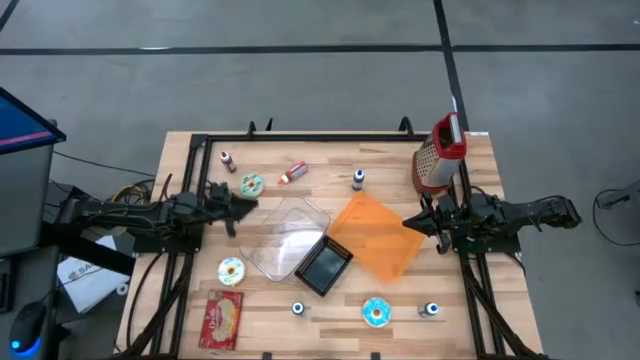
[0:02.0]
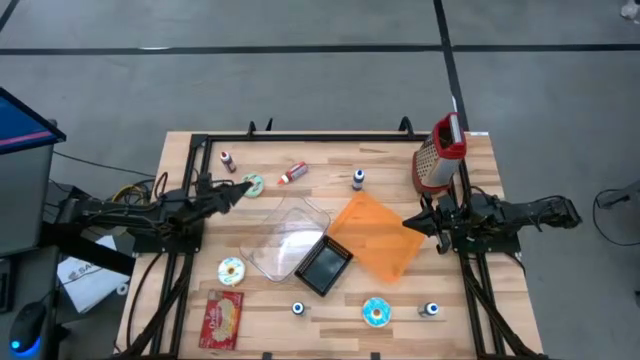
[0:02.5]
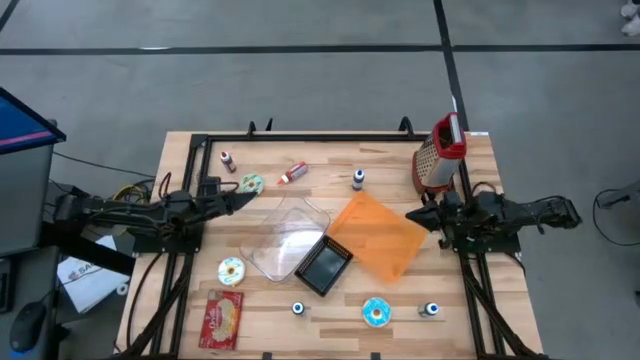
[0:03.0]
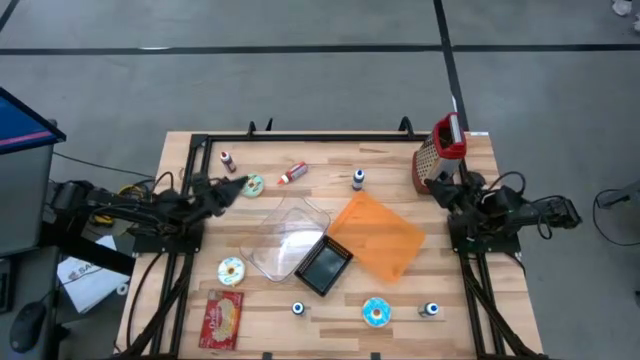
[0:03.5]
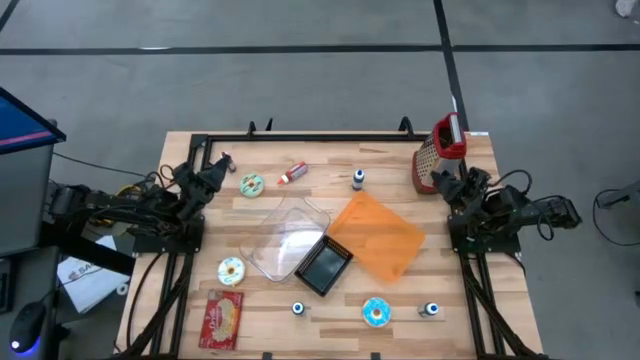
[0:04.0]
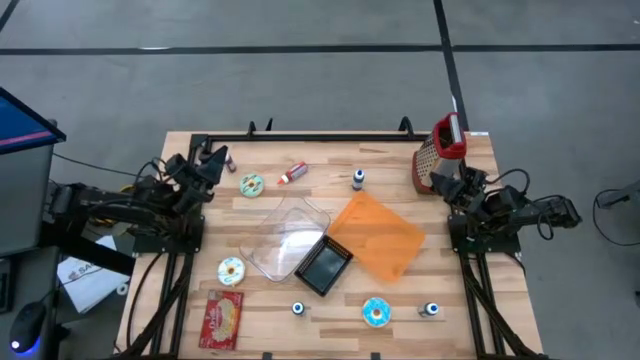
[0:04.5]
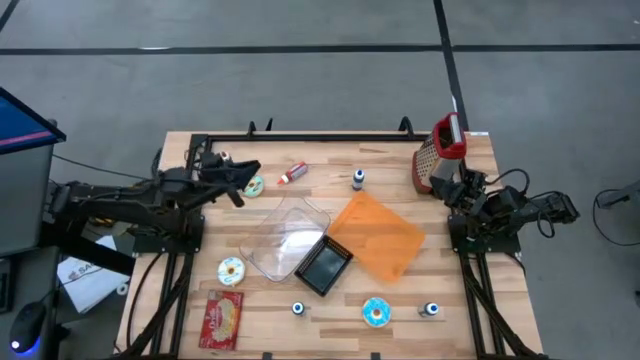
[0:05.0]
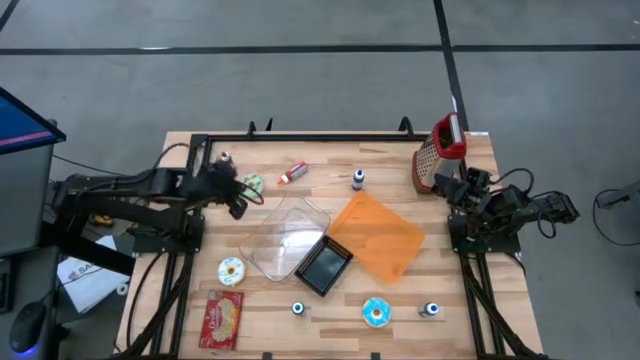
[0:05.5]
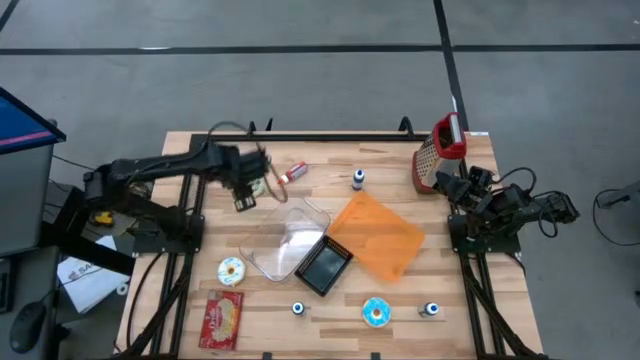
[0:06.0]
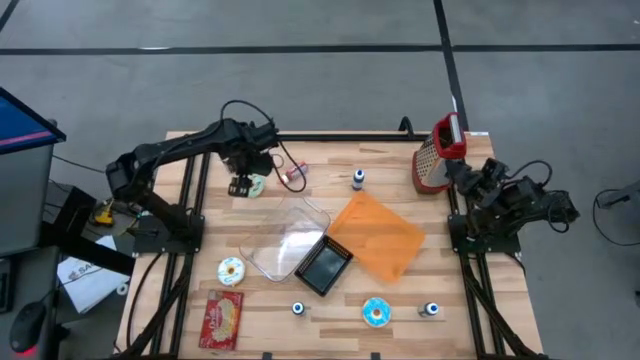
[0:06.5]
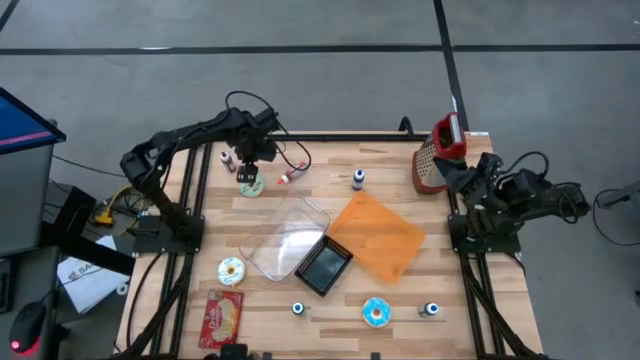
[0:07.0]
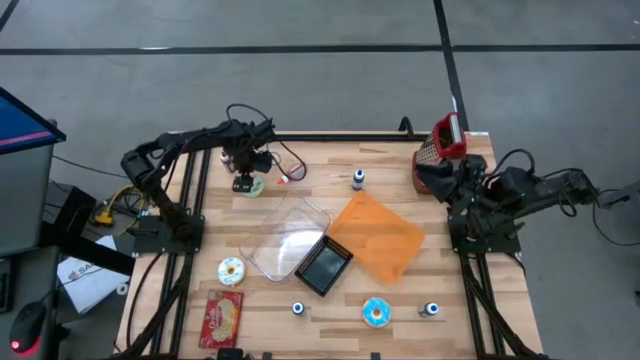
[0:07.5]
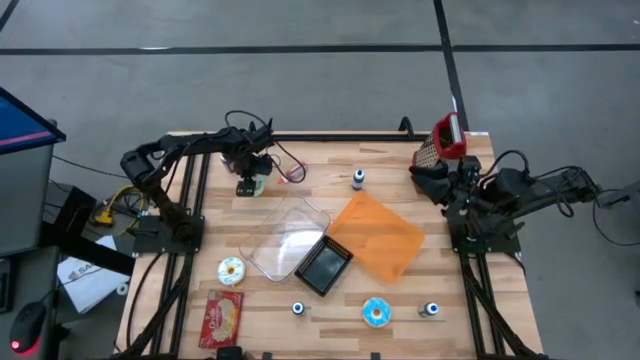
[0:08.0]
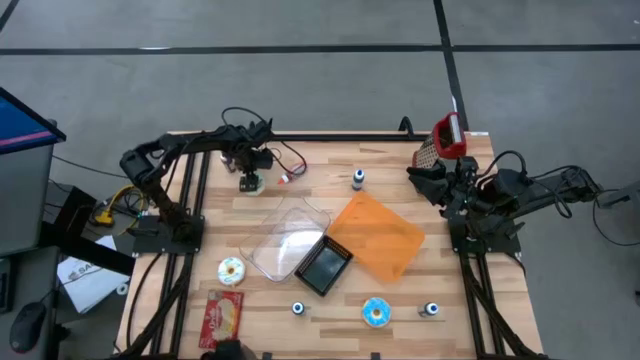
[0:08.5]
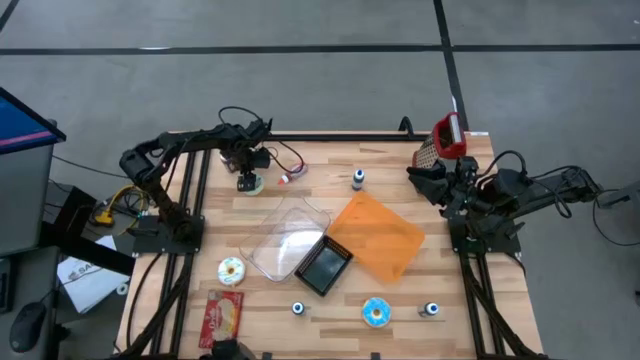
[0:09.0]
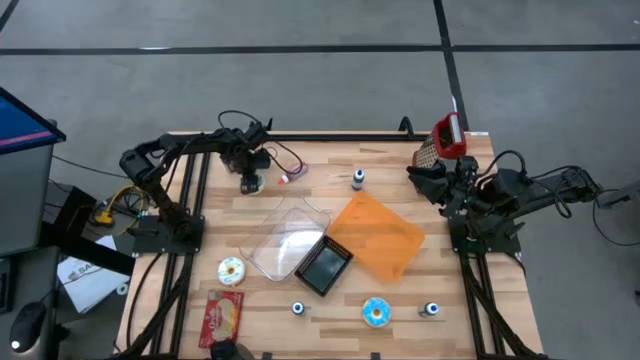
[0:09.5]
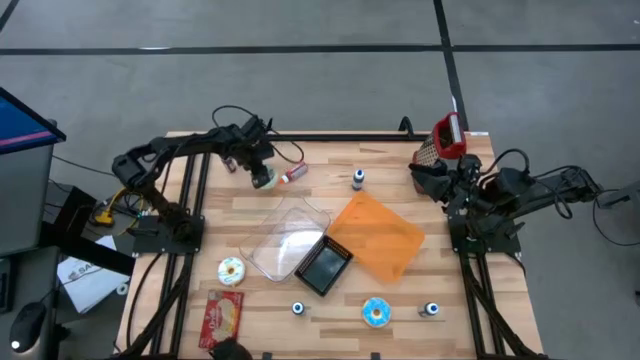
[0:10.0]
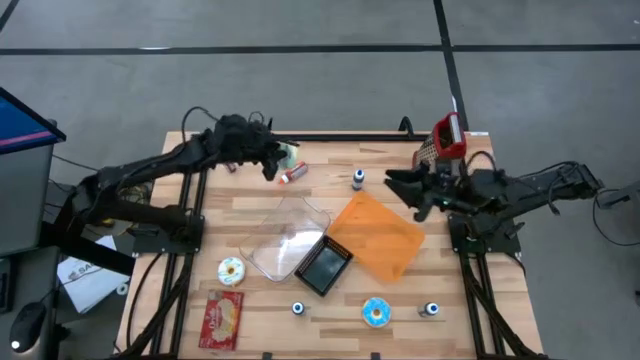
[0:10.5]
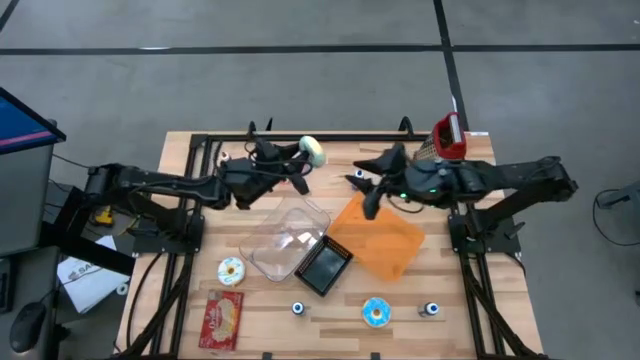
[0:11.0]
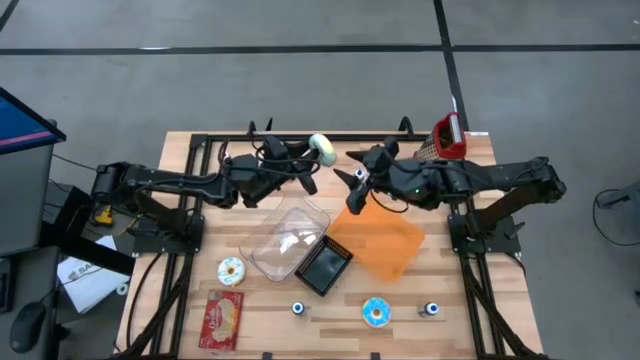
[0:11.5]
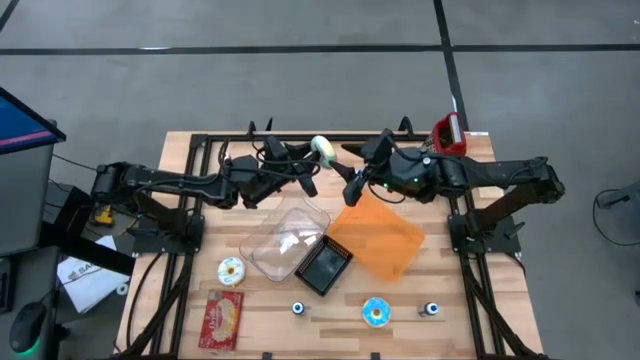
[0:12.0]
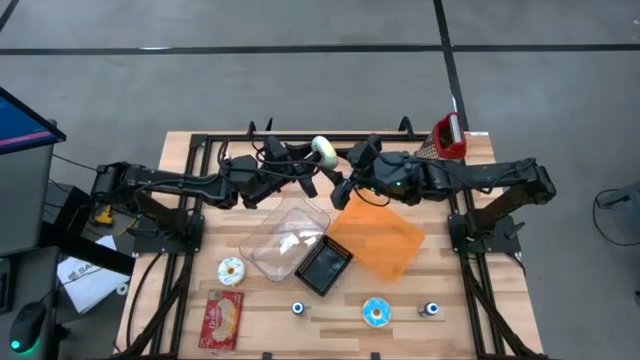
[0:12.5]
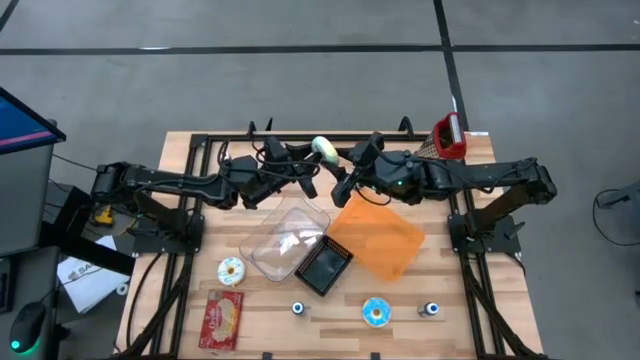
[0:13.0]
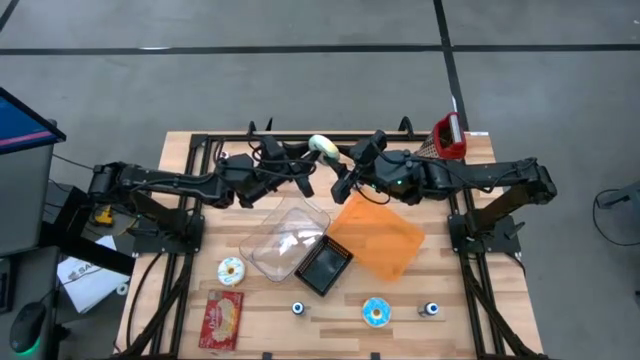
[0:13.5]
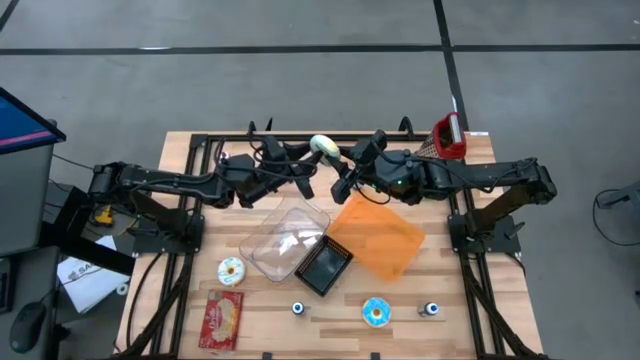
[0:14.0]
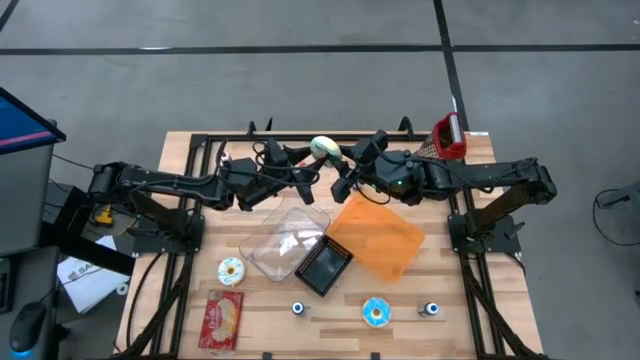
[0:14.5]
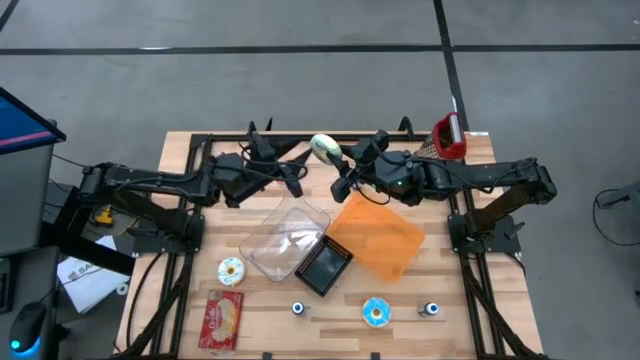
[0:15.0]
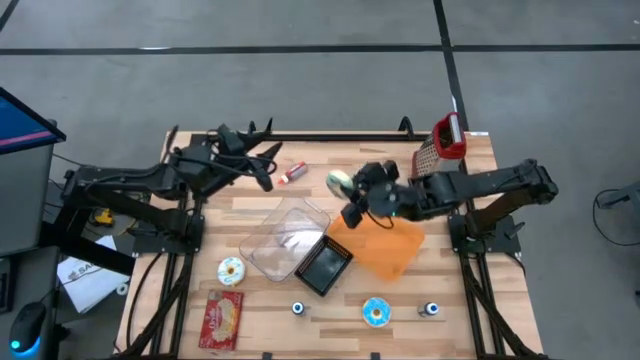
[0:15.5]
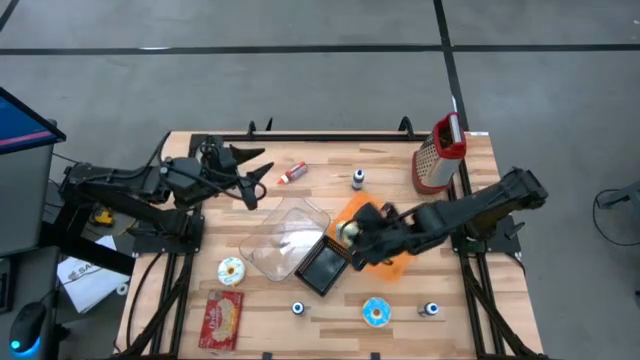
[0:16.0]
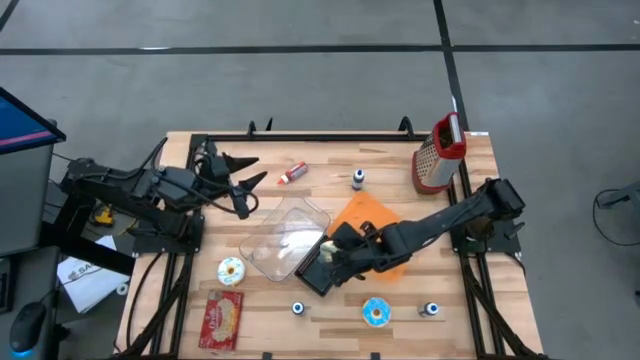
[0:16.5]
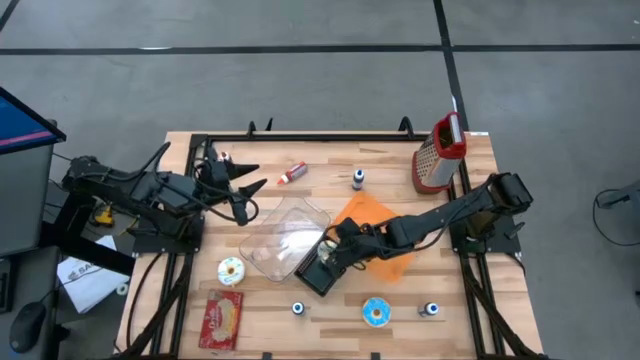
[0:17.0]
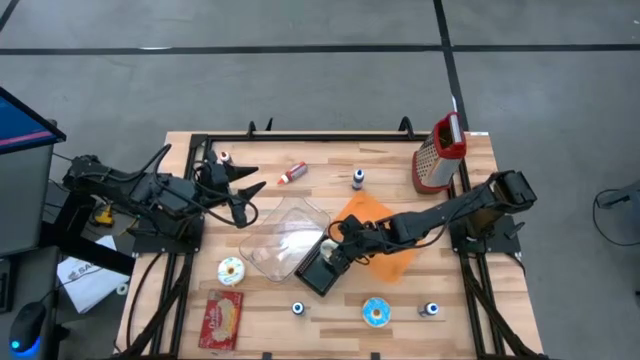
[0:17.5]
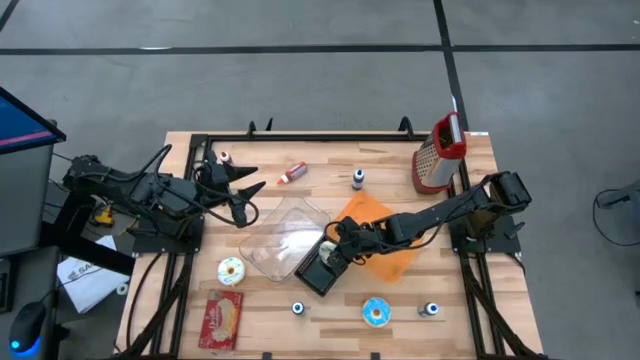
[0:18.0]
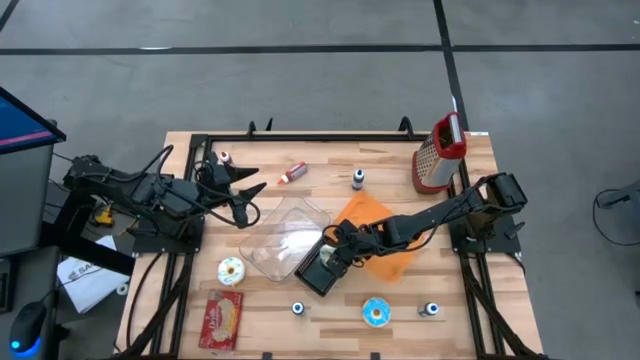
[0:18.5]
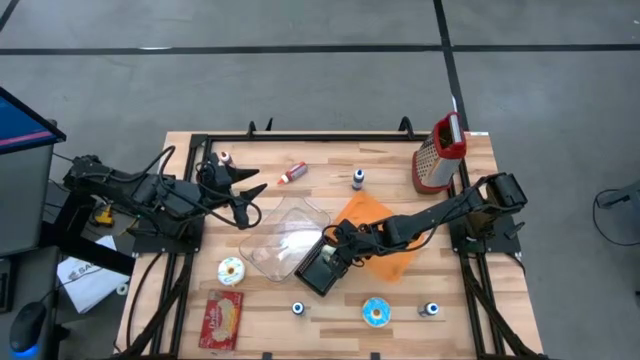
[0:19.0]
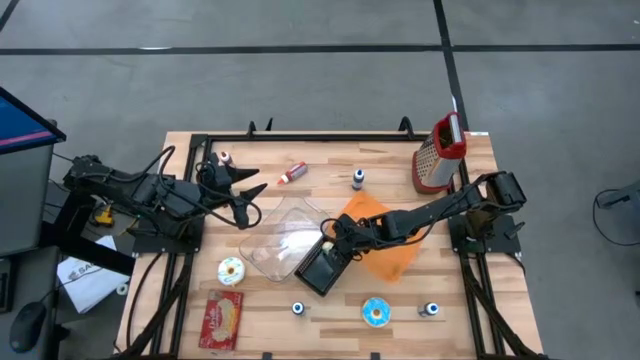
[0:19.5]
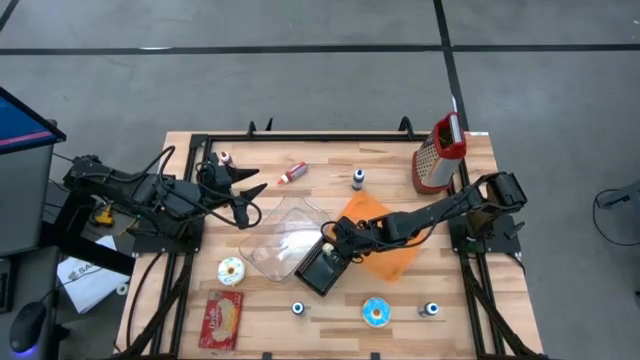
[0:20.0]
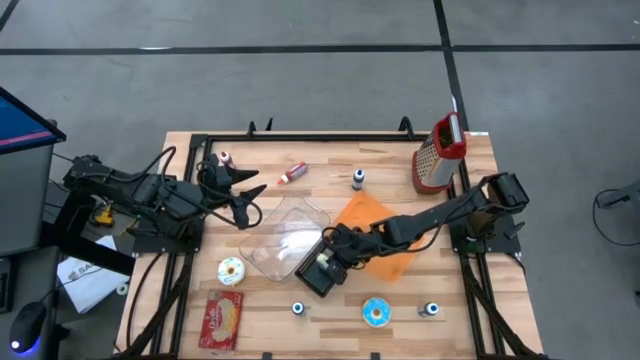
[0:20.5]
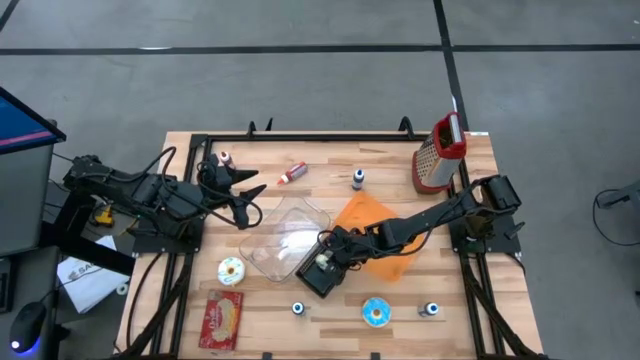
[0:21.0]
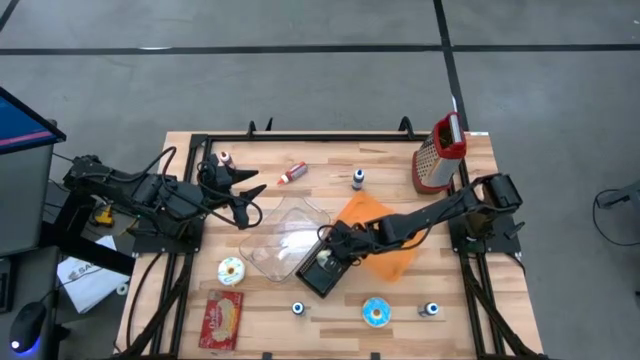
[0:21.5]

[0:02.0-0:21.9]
Put the light blue donut into the black bin
